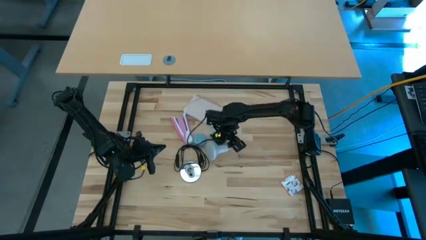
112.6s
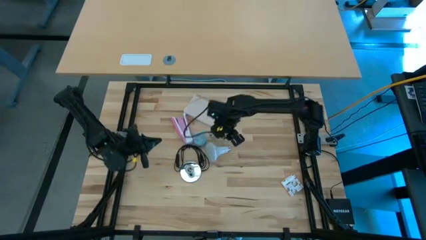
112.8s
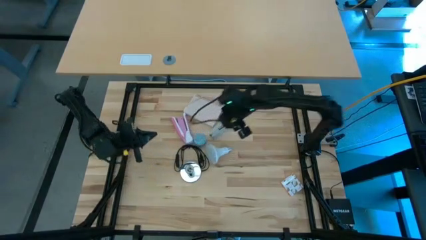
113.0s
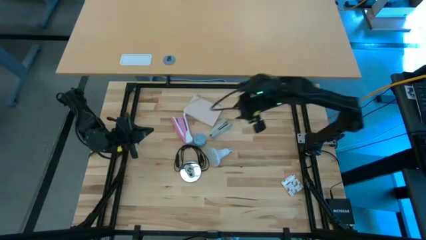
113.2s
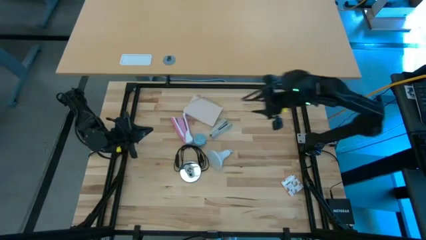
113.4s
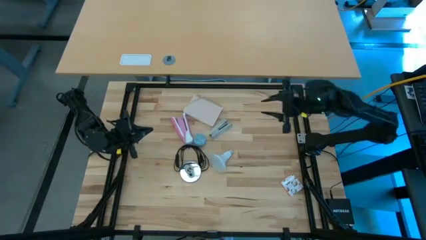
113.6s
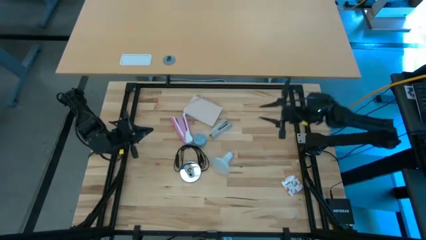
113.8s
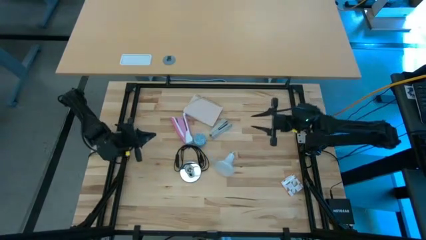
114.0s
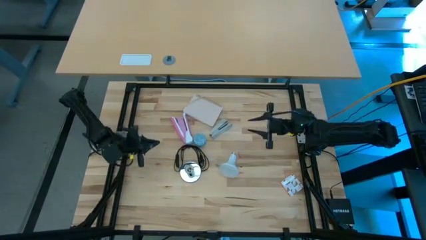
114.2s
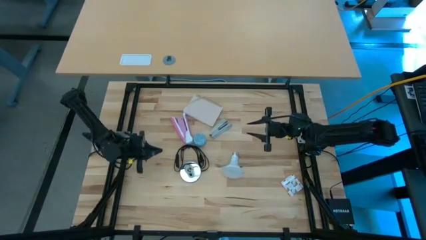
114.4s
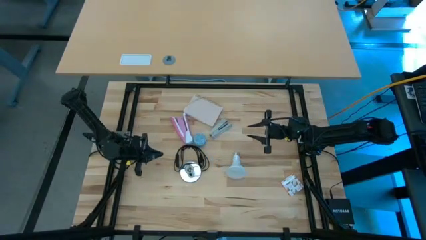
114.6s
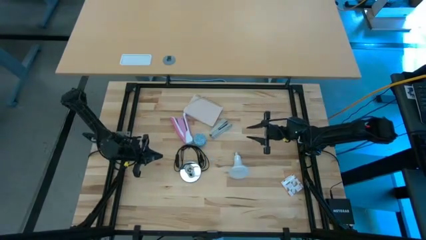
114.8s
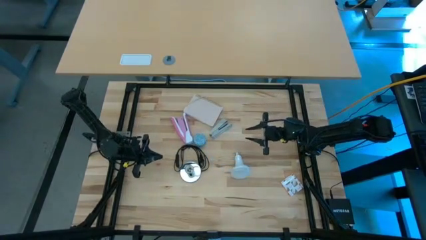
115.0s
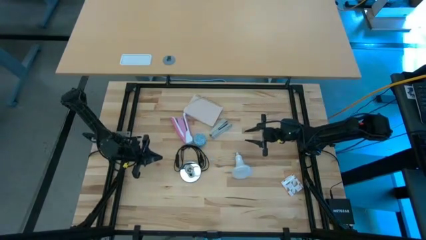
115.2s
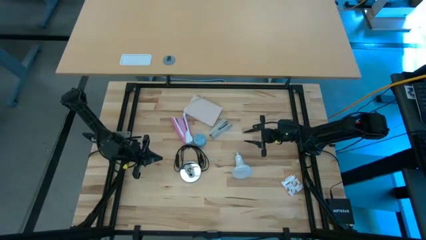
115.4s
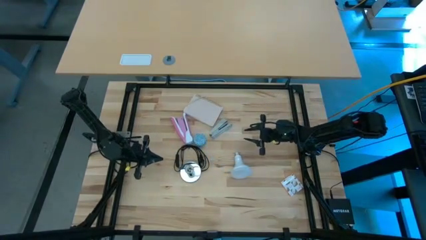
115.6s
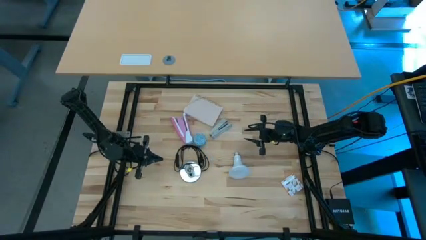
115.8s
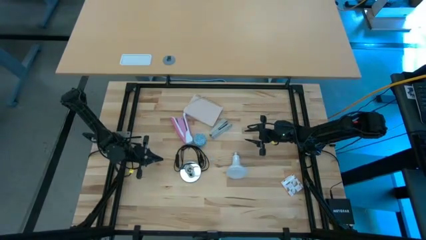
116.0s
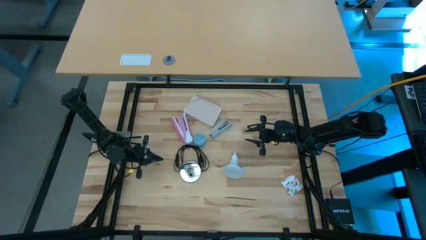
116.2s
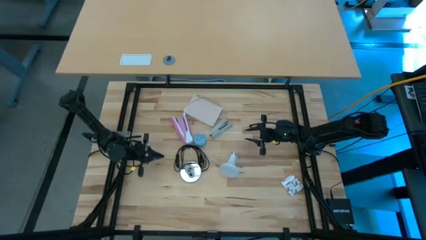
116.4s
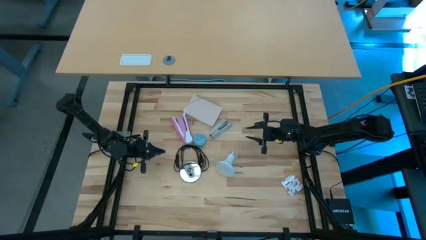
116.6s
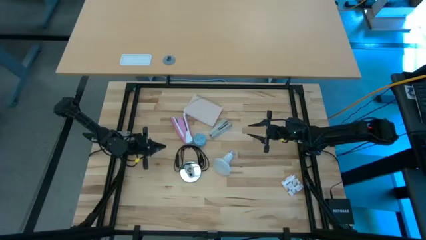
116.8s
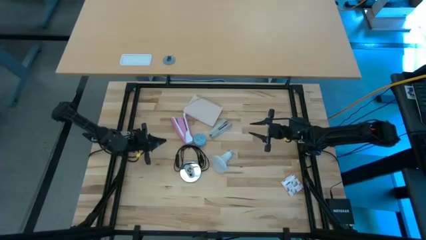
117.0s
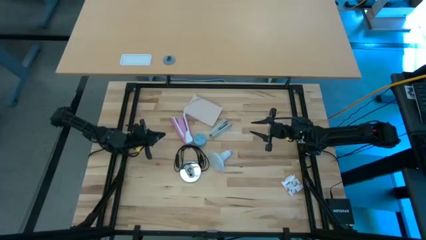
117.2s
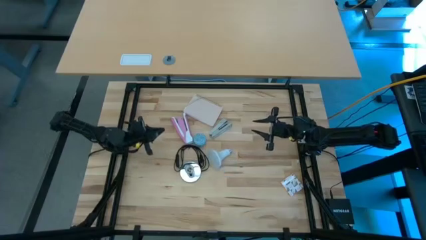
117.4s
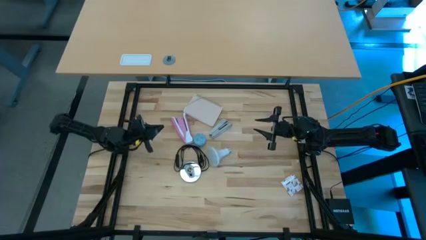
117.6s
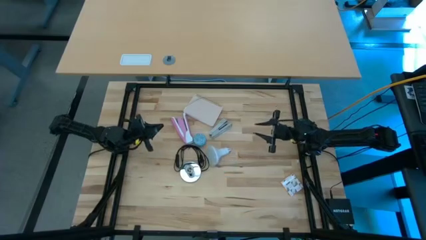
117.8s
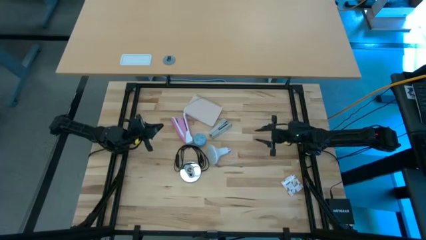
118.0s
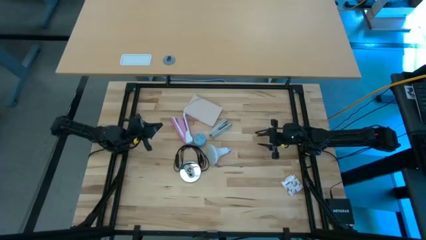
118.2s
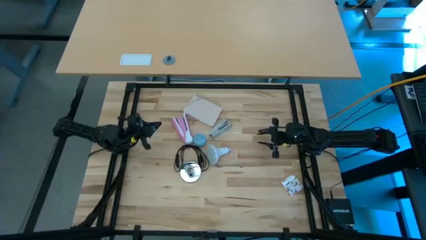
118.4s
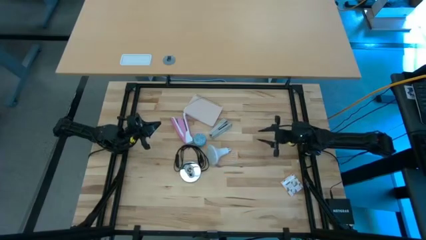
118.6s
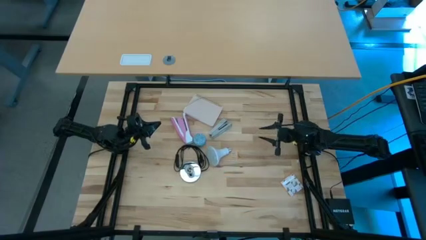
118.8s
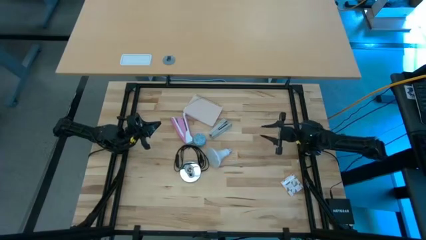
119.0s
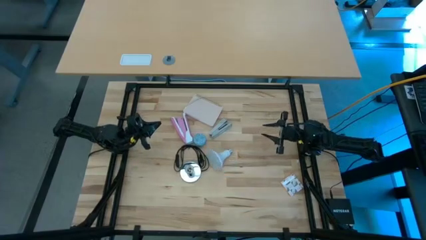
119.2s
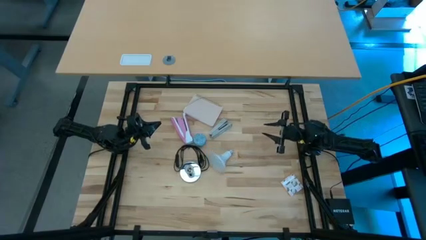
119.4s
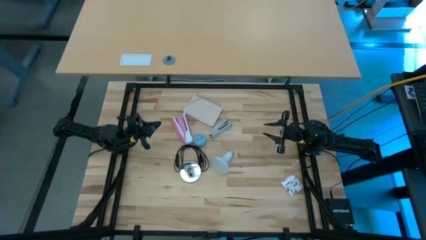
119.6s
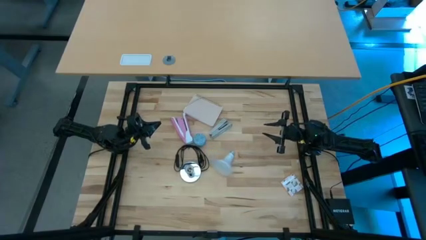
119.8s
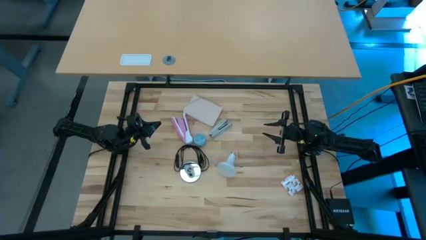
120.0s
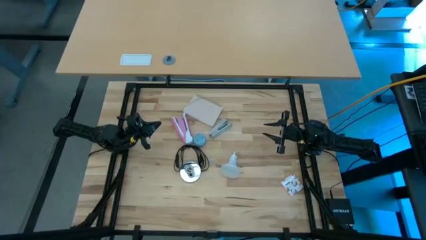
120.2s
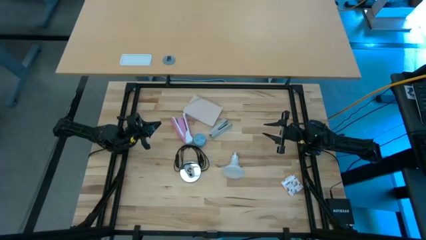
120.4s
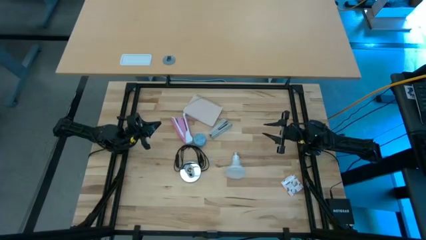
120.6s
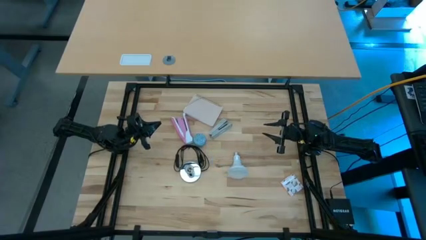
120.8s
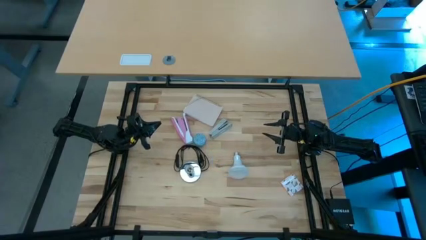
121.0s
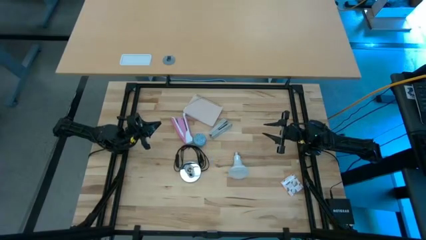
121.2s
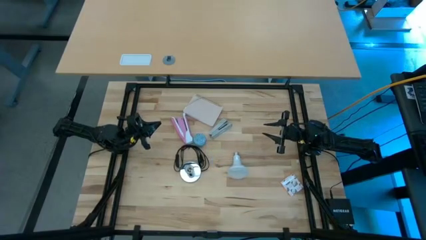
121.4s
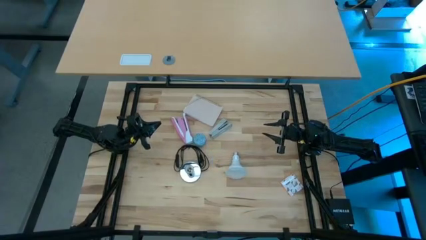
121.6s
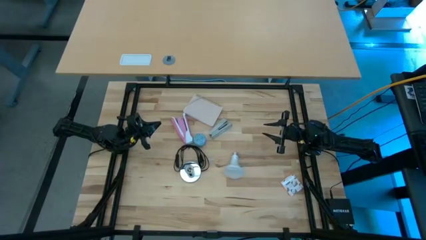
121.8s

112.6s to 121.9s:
Task: Screw lightbulb
Return to Home Position

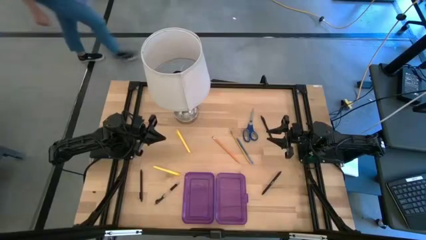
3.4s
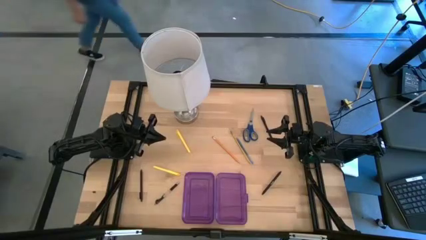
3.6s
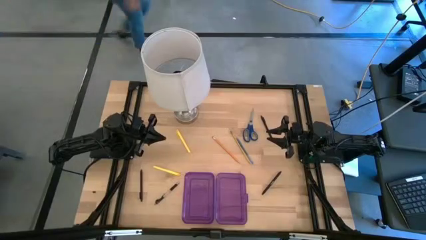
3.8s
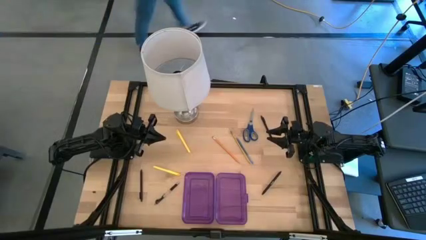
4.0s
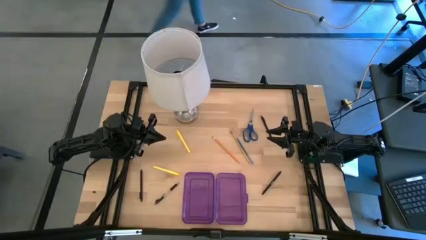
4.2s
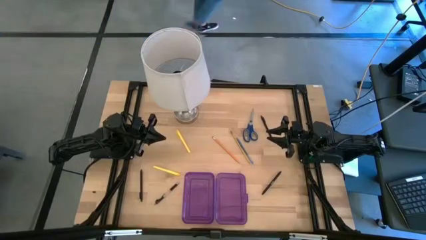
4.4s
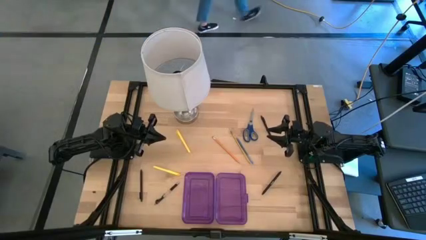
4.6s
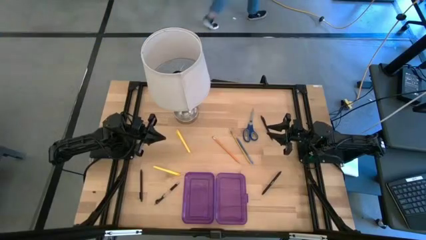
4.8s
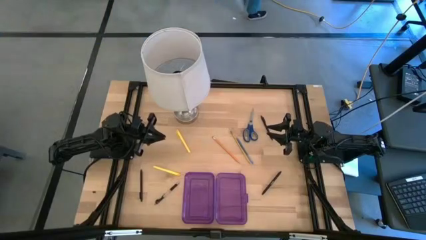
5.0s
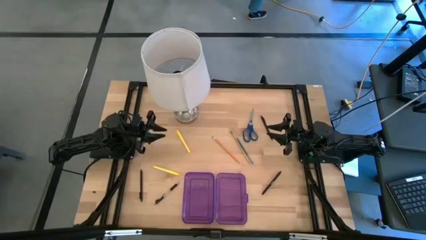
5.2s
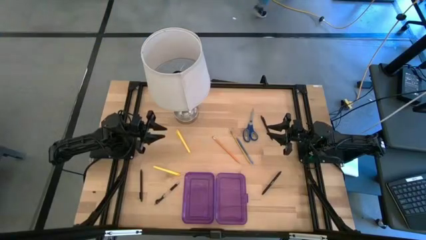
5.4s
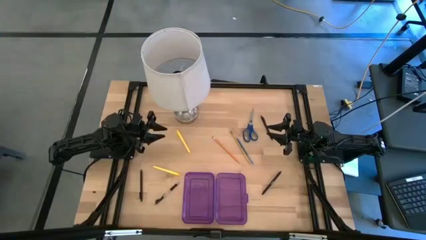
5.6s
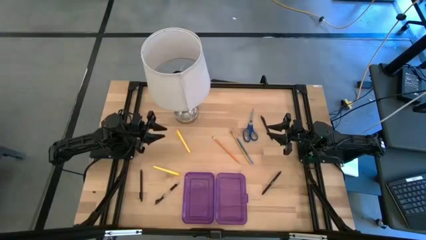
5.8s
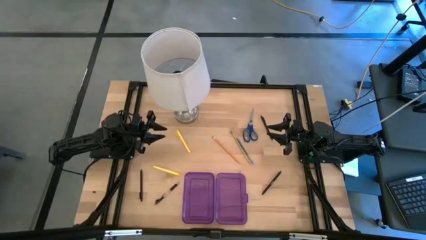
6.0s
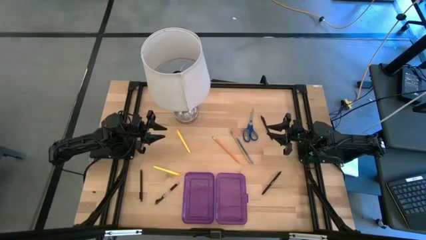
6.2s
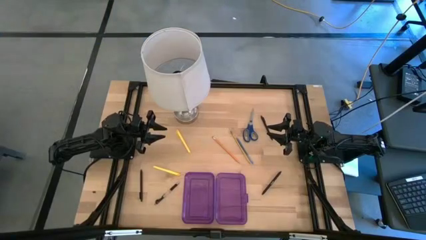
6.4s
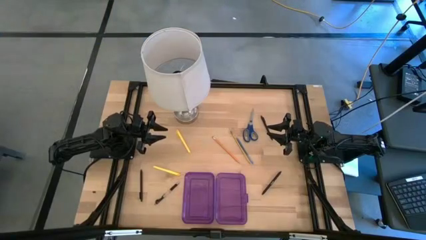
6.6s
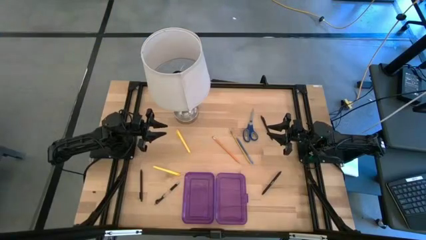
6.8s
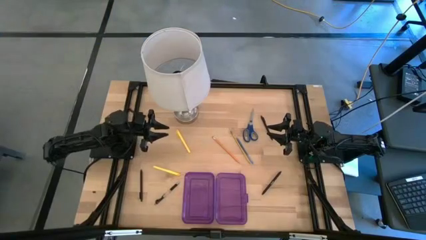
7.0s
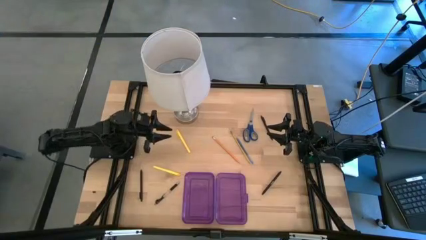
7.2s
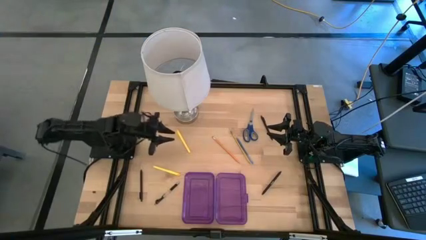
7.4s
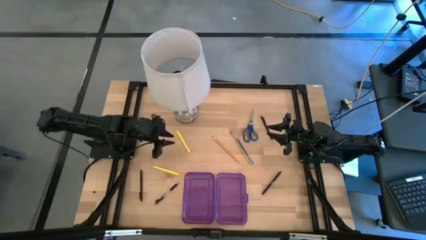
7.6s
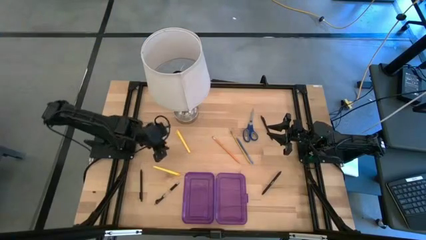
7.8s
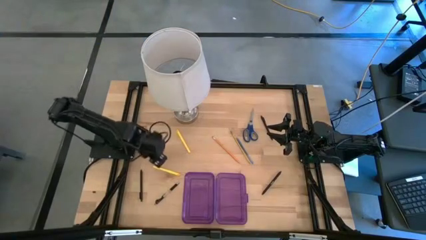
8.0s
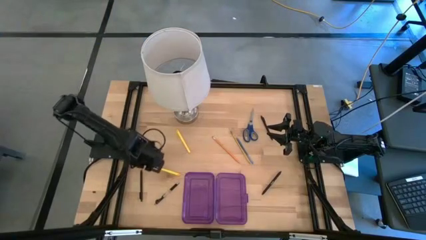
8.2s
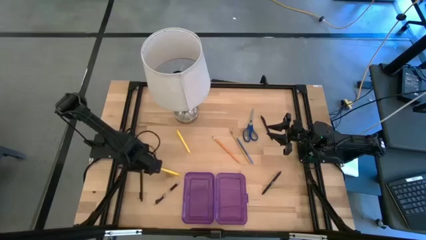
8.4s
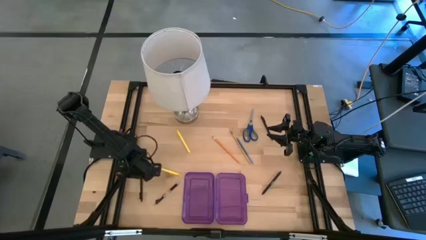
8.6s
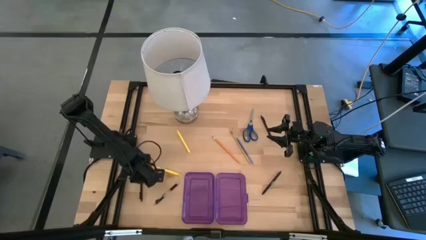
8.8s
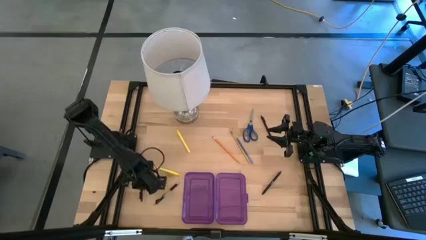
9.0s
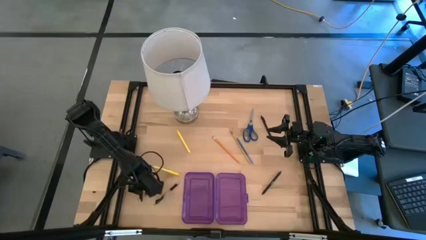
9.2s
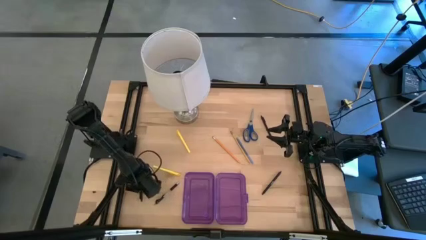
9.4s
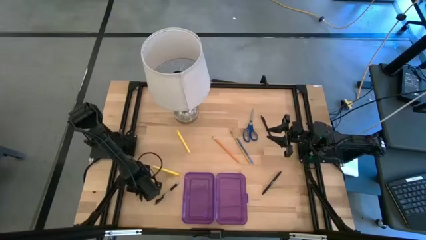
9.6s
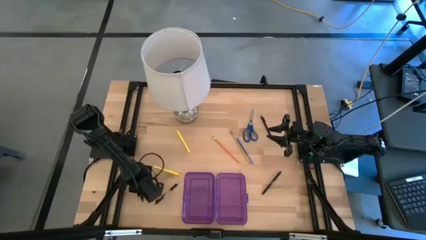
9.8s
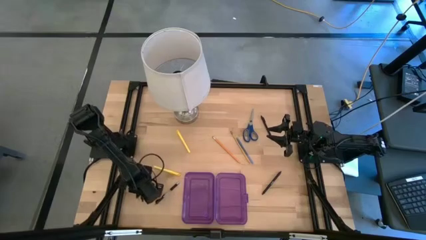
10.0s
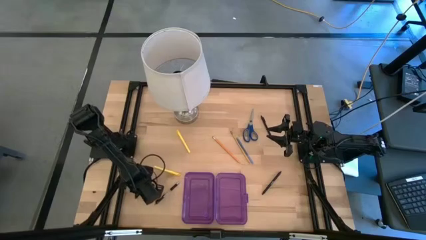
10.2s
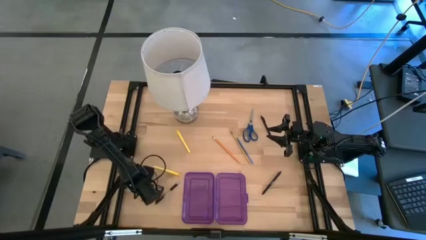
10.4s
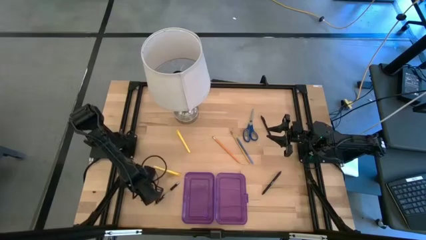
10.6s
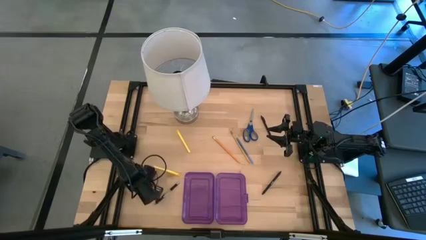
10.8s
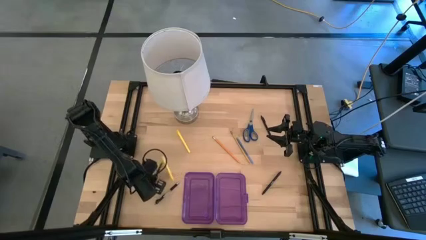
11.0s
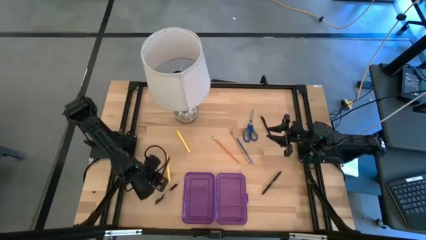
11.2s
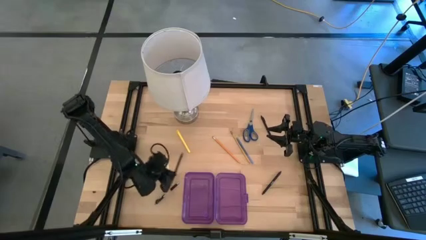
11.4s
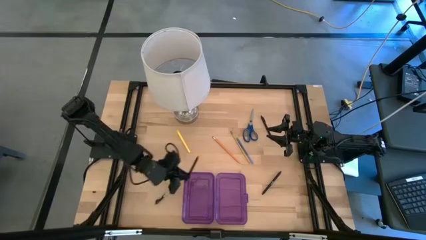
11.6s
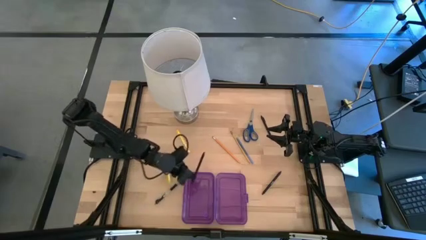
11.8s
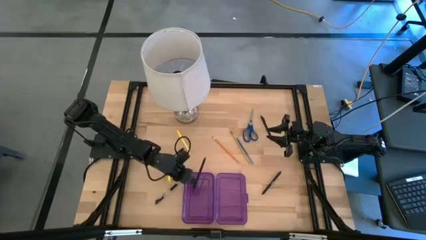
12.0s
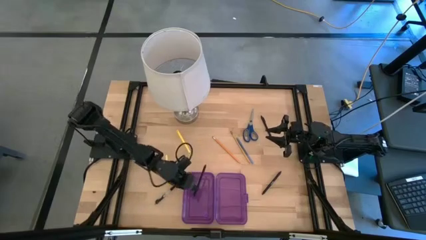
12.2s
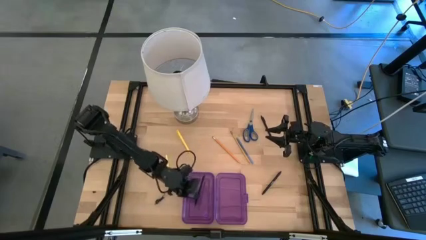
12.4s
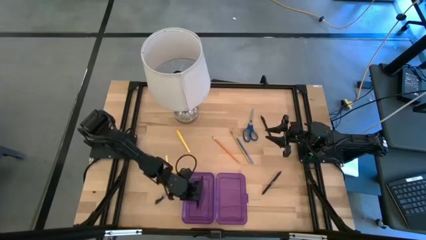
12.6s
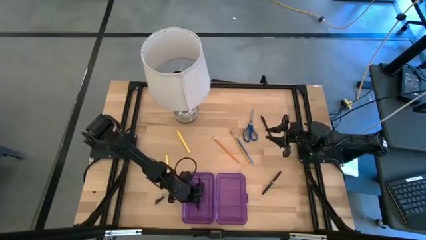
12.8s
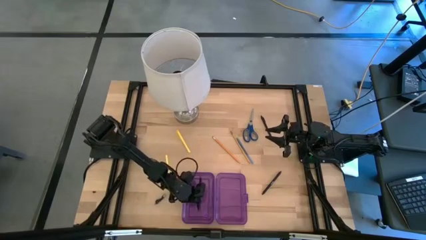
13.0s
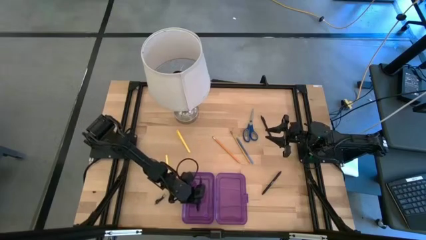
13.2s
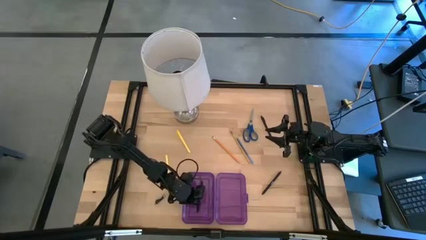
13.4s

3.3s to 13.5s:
Task: Pick & place school supplies into a supply box
Put the bottom left black pen into the violet supply box
